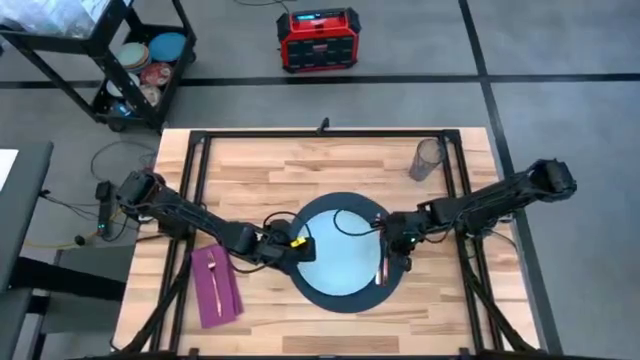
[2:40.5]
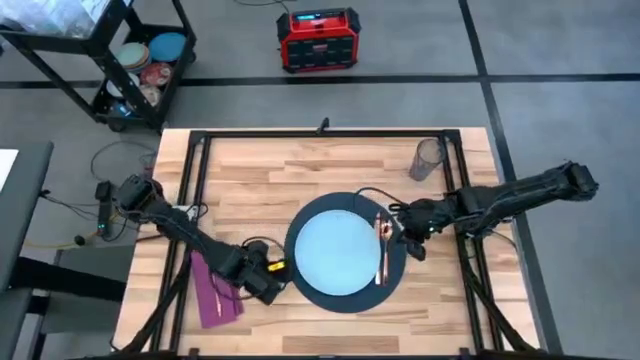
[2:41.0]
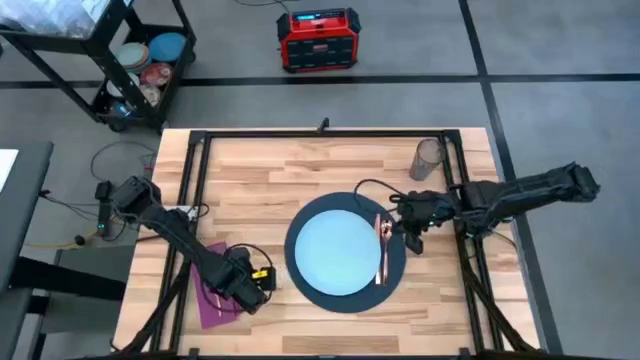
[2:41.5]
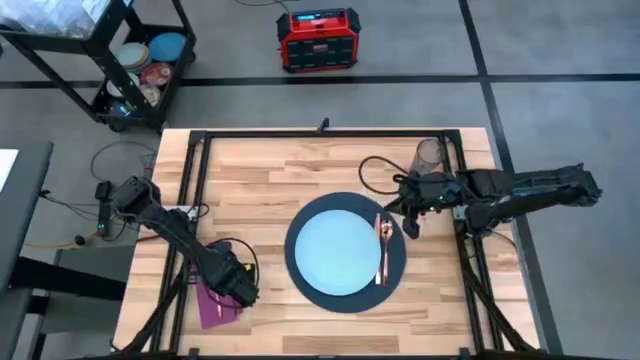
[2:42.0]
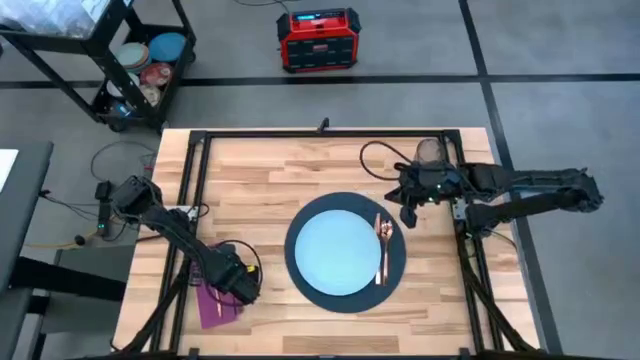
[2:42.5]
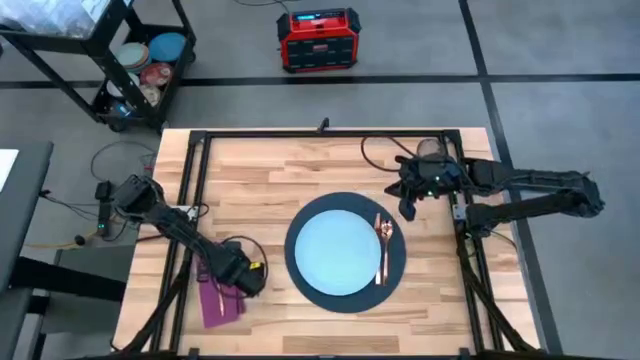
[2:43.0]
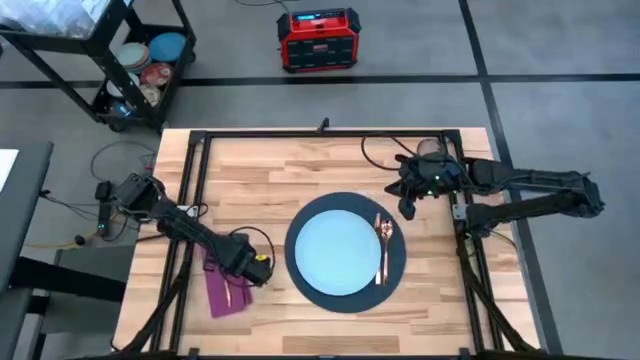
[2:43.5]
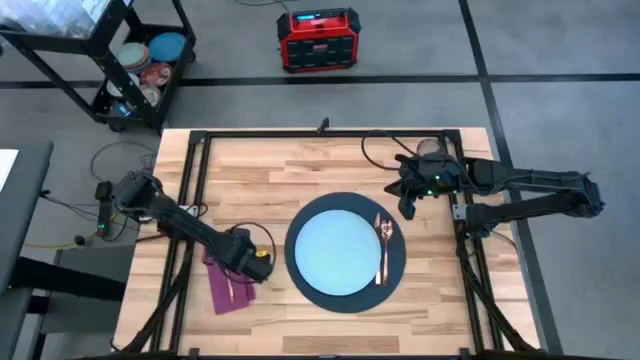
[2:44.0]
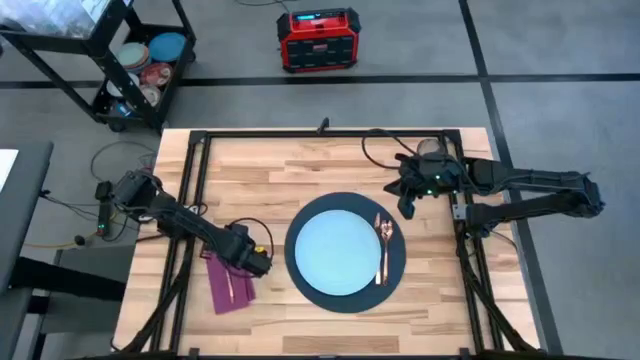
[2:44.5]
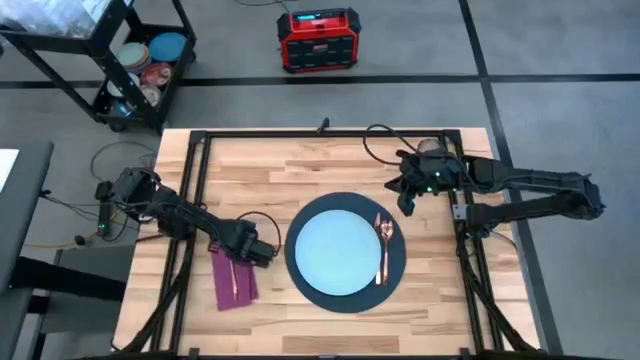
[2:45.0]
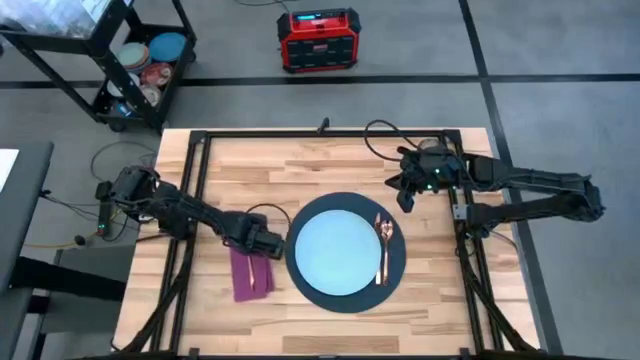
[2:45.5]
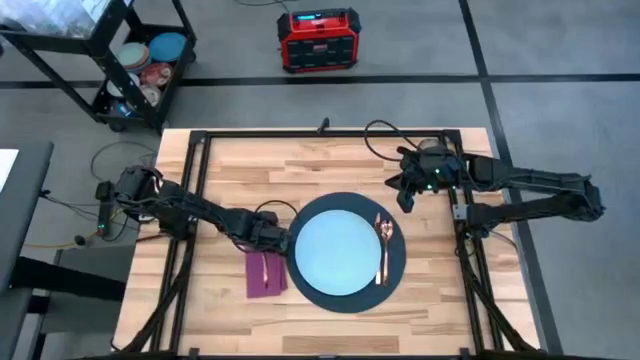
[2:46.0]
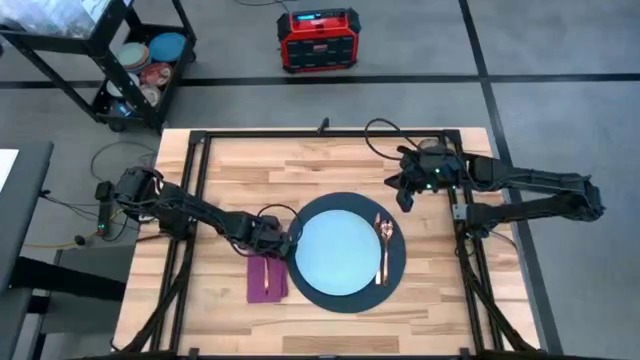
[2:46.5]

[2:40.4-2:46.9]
Task: Set table place
Move the pink table napkin to the left of the blue table mat

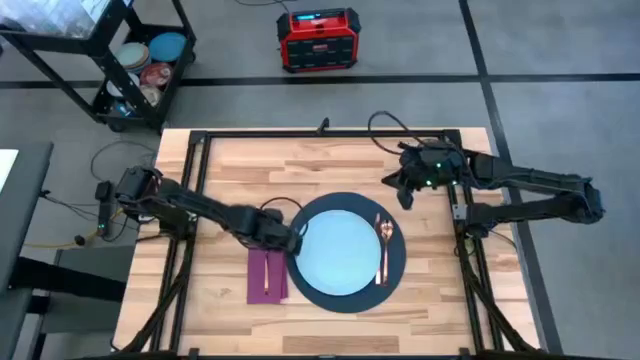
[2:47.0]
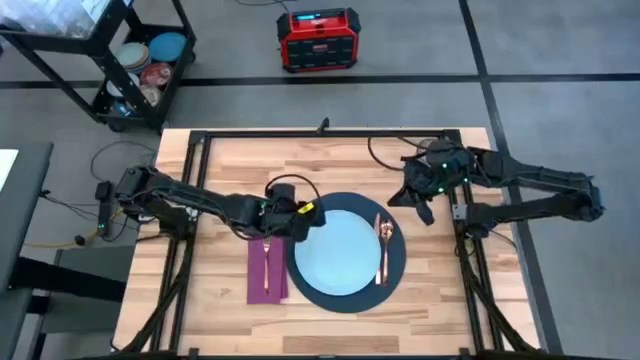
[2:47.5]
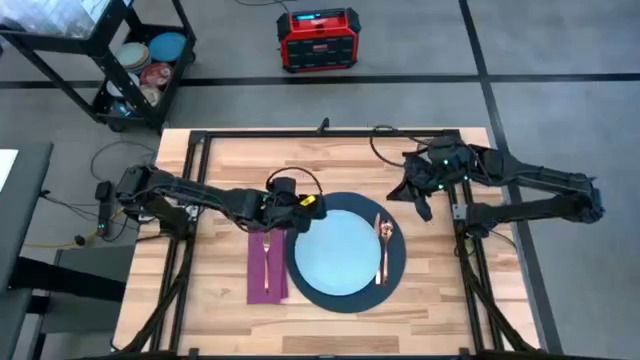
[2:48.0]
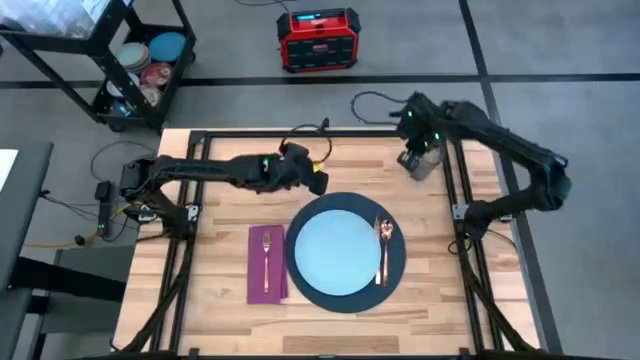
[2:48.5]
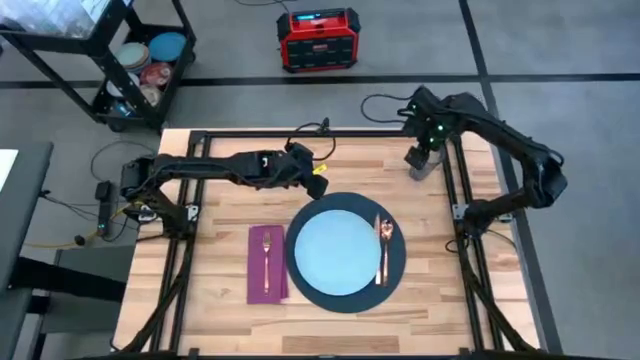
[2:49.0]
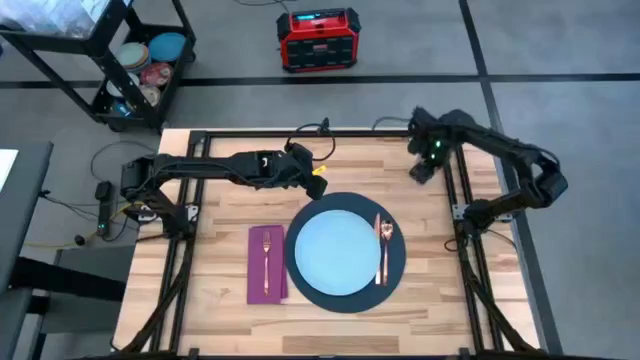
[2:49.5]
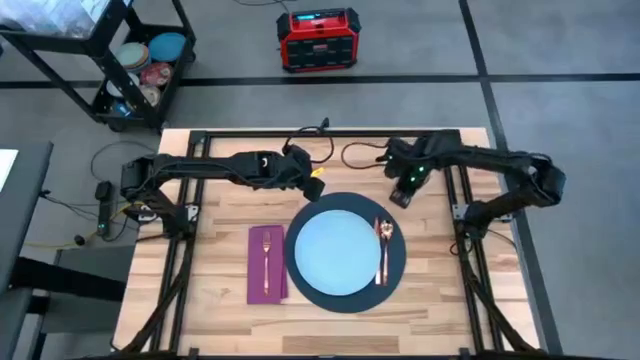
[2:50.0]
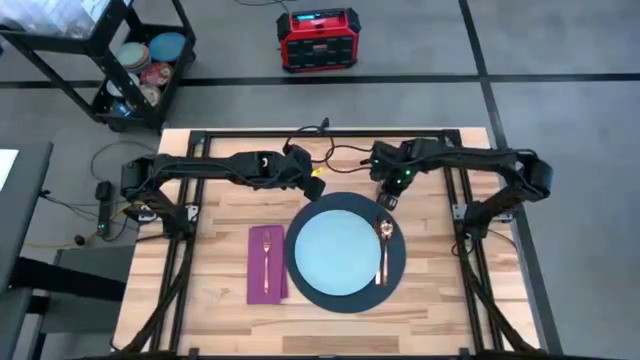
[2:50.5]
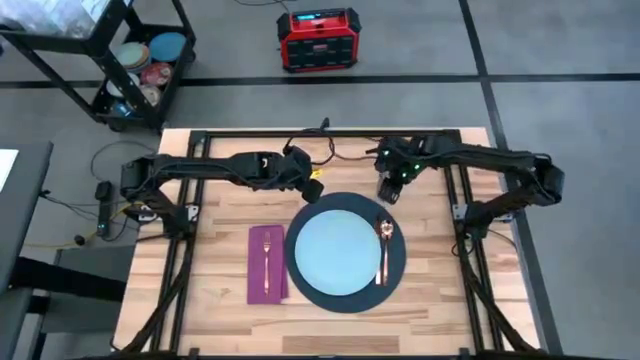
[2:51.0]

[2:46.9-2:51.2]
Move the blue glass to the top right of the blue table mat

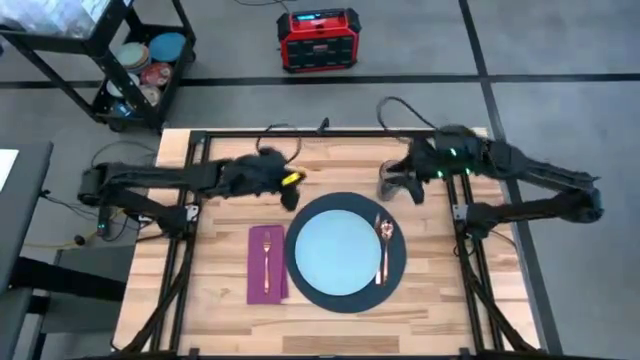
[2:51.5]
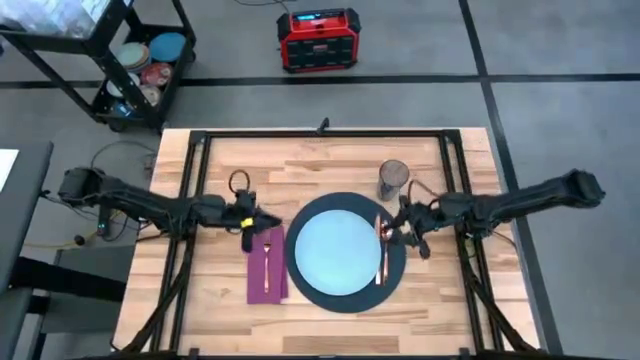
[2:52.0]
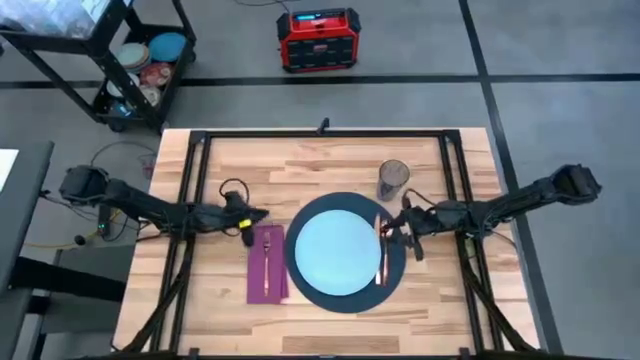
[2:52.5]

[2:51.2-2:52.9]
Return to Home Position

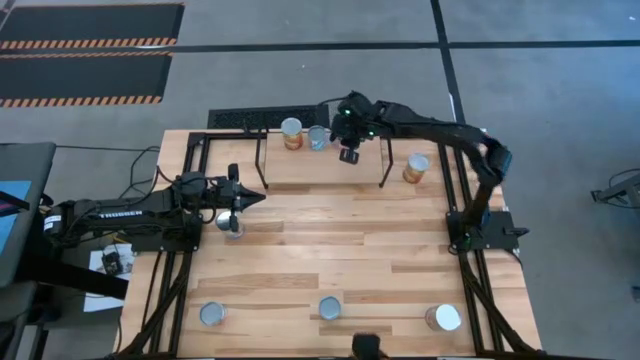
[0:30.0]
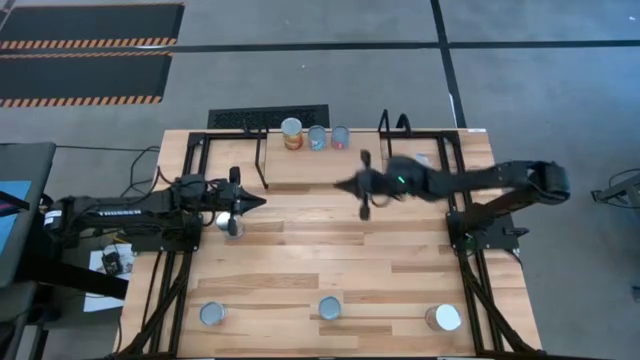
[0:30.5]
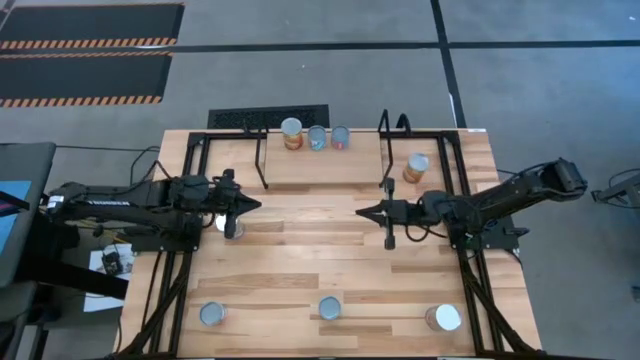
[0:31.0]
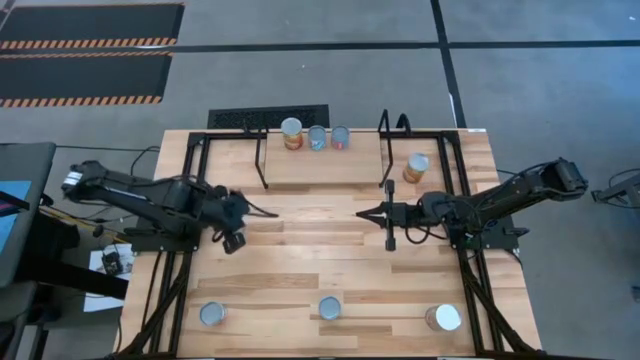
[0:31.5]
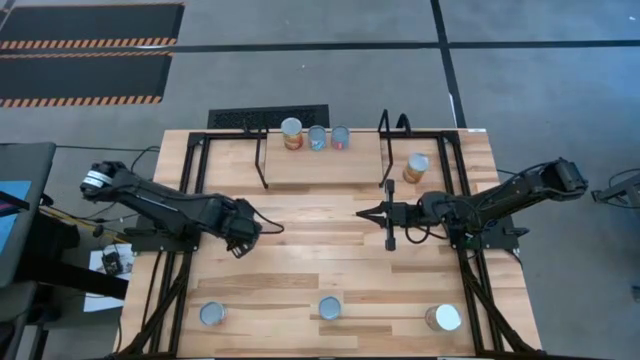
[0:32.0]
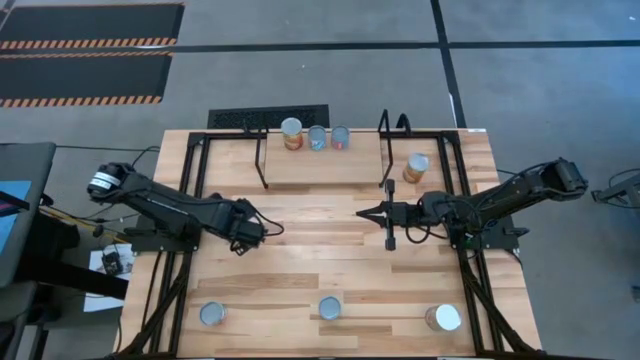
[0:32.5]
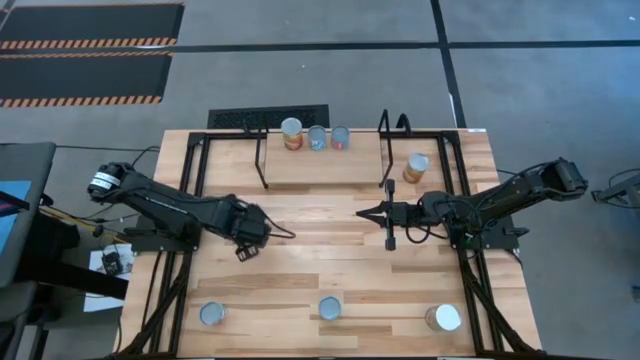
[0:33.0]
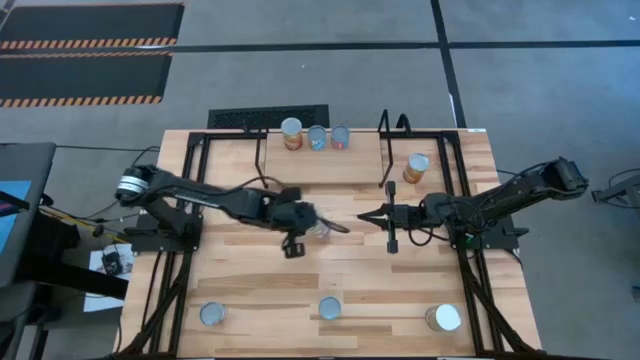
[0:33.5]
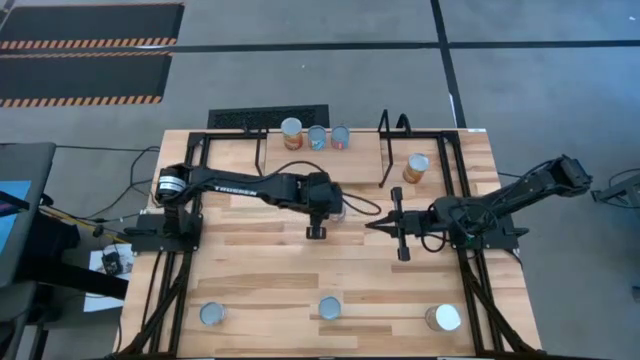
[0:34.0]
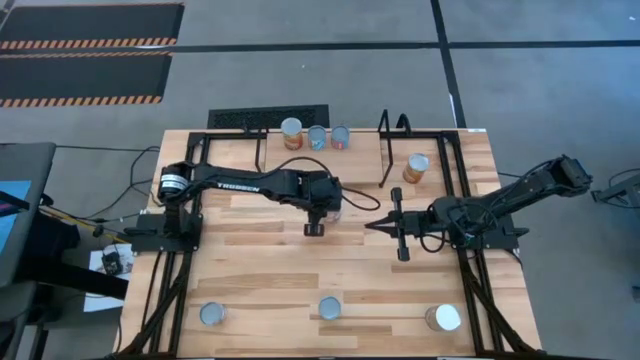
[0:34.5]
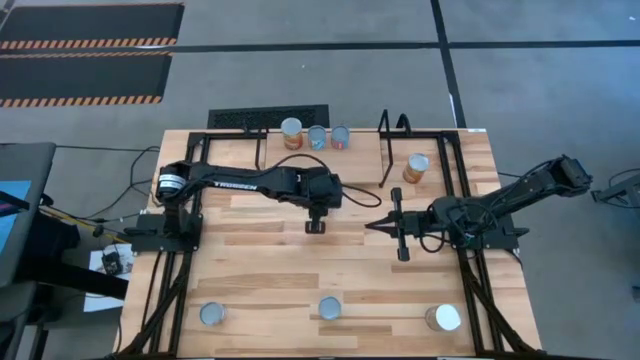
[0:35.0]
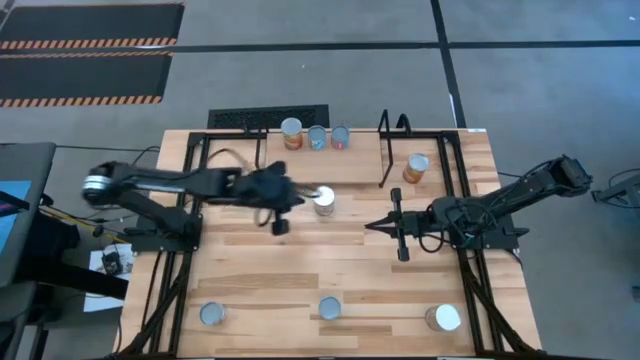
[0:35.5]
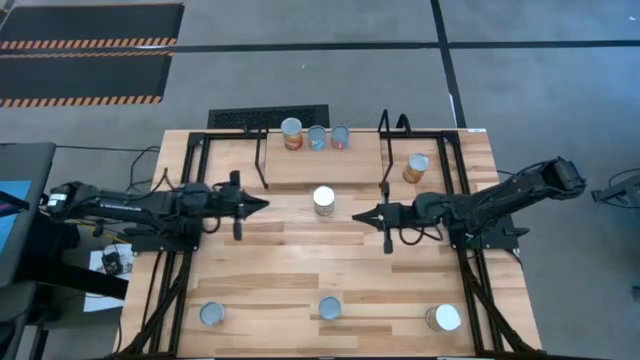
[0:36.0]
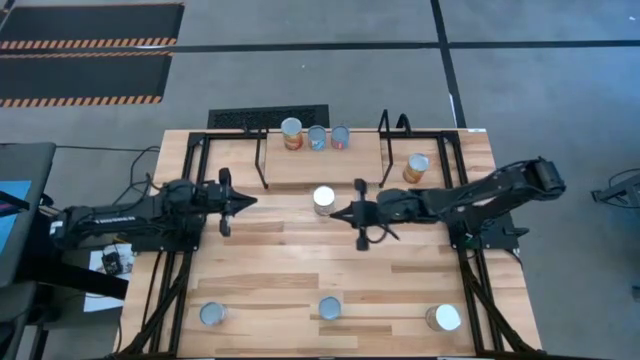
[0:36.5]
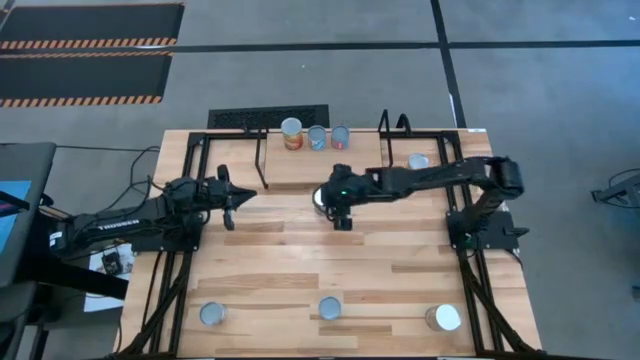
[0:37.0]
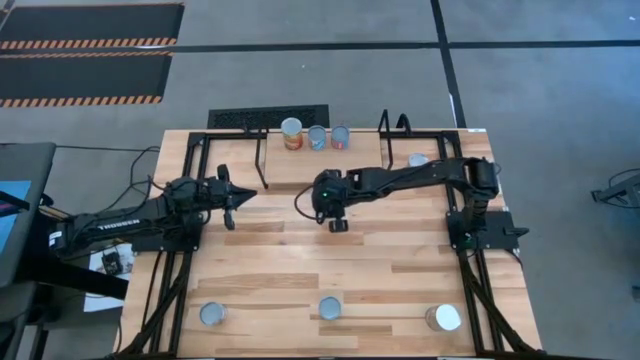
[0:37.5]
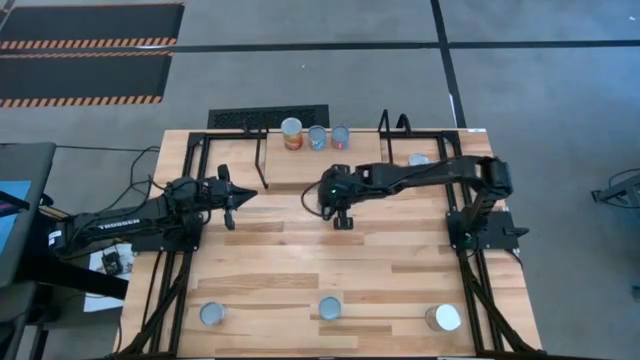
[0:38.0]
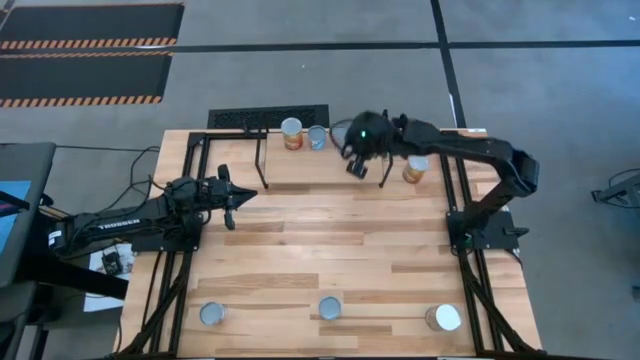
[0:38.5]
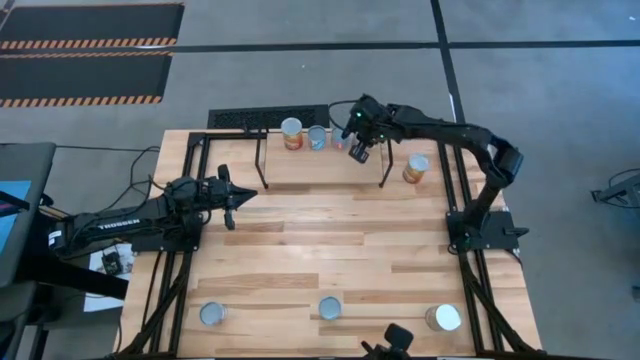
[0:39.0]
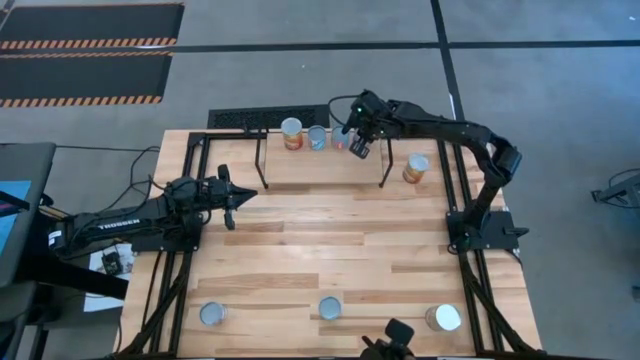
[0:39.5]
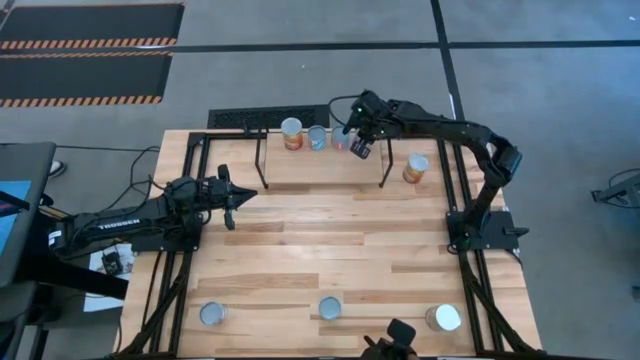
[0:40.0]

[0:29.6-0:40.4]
Task: Pick and place cans onto a shelf
Put the top canned peaches on the shelf
